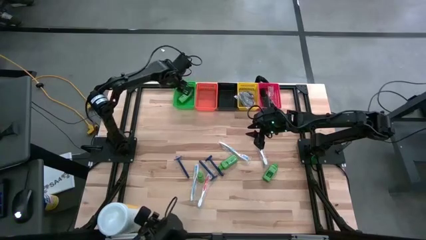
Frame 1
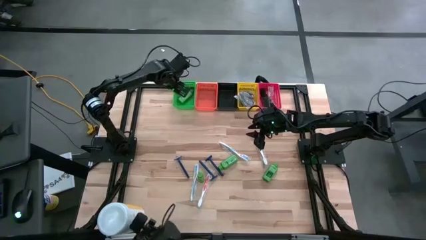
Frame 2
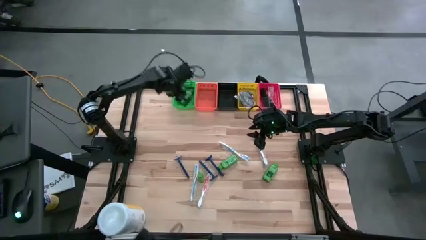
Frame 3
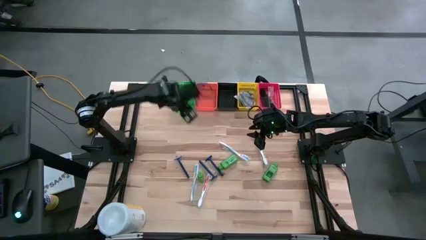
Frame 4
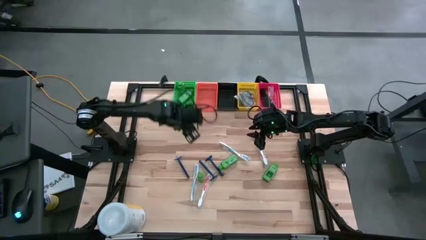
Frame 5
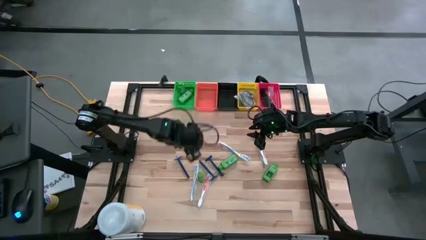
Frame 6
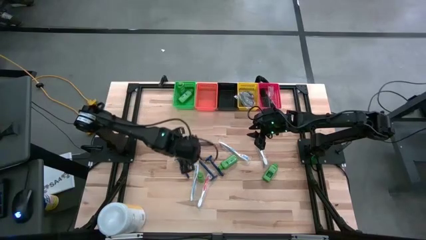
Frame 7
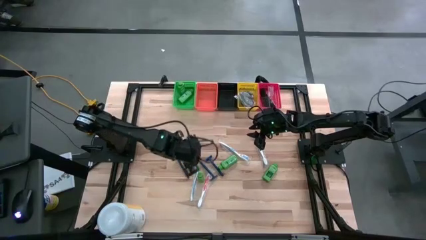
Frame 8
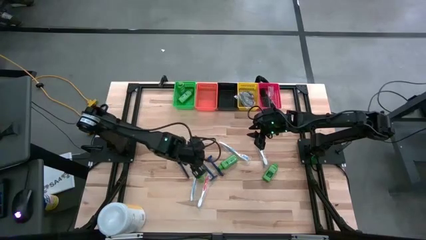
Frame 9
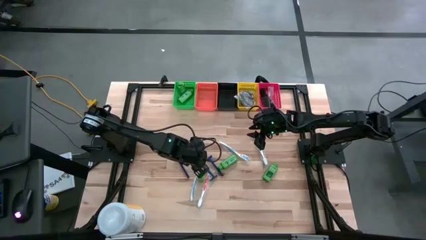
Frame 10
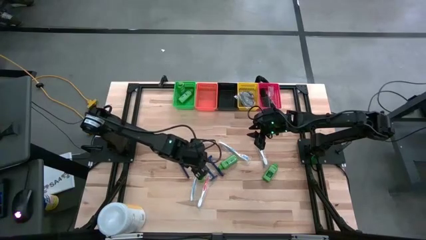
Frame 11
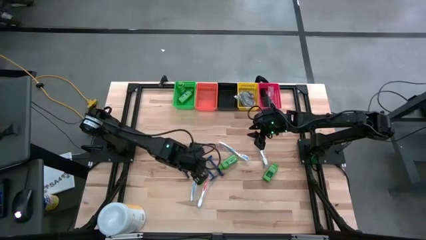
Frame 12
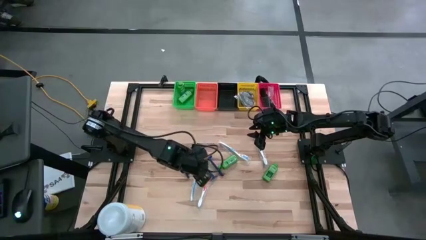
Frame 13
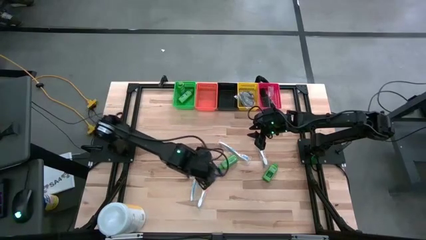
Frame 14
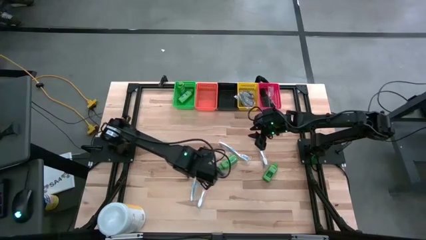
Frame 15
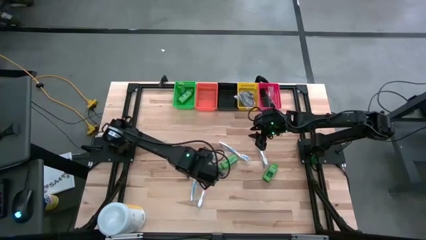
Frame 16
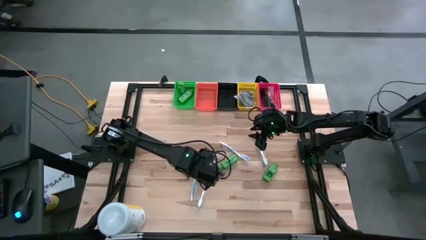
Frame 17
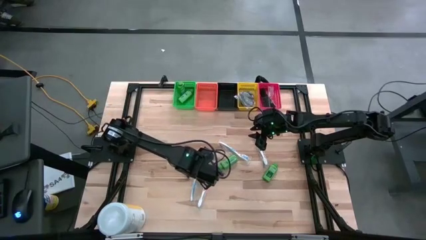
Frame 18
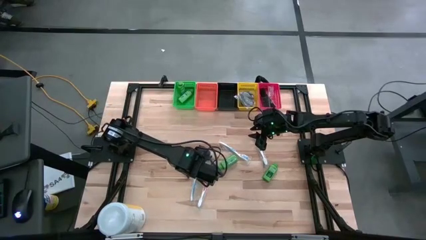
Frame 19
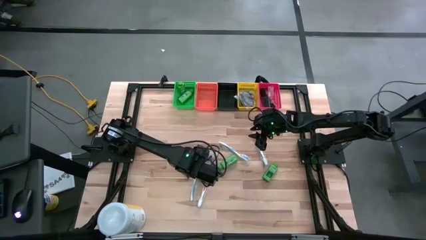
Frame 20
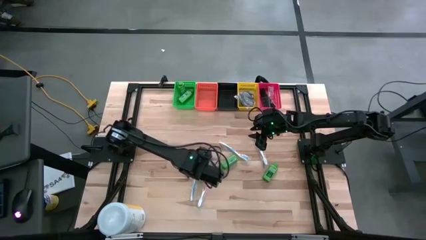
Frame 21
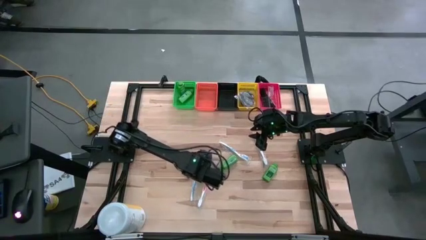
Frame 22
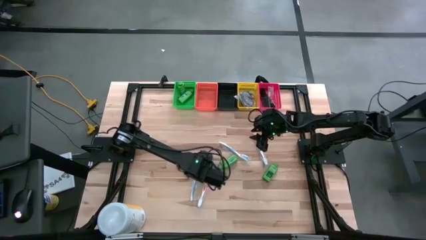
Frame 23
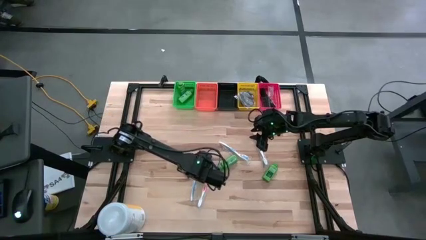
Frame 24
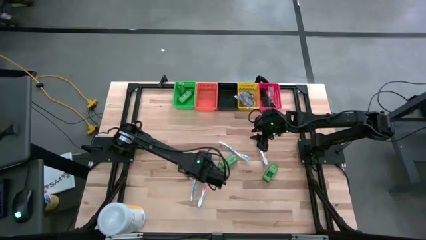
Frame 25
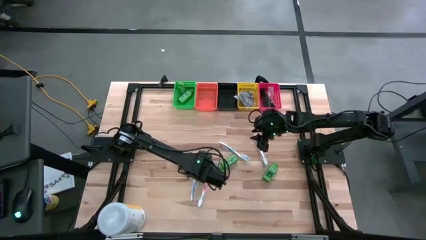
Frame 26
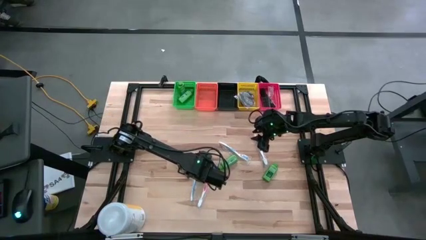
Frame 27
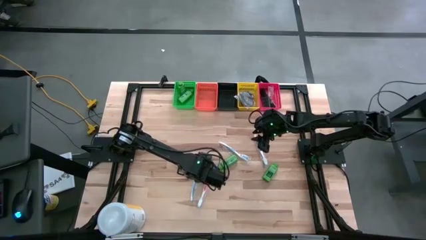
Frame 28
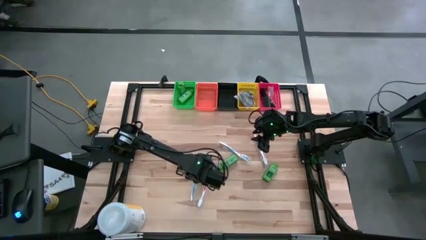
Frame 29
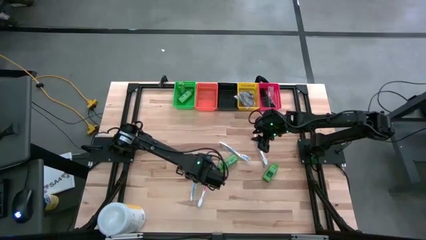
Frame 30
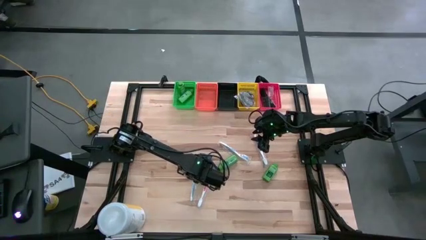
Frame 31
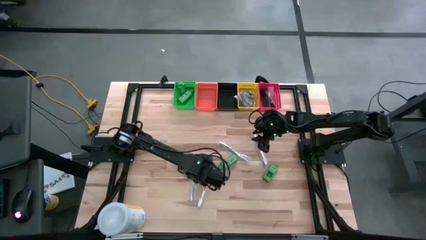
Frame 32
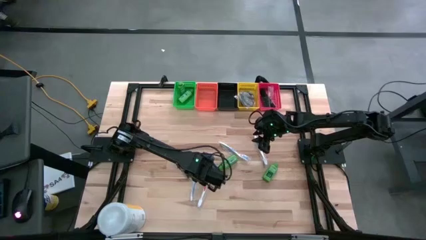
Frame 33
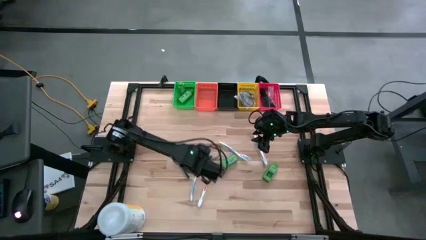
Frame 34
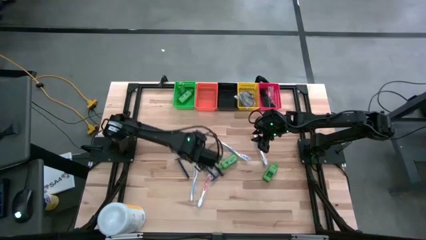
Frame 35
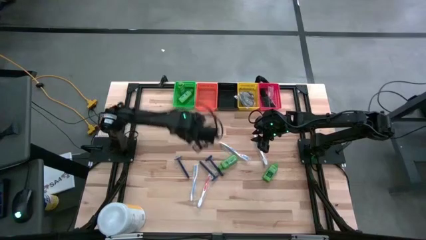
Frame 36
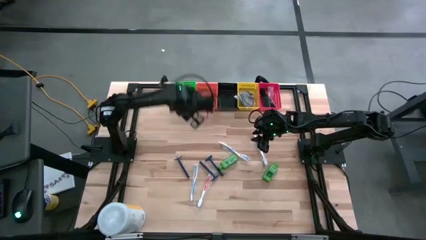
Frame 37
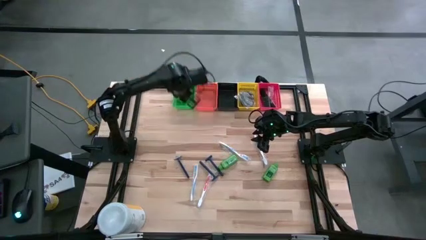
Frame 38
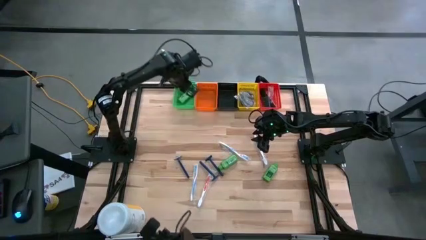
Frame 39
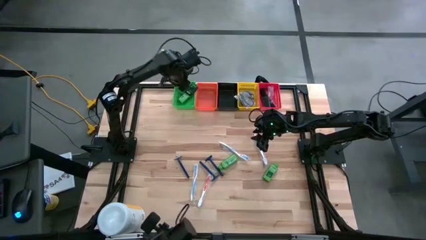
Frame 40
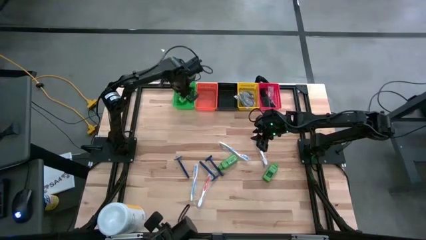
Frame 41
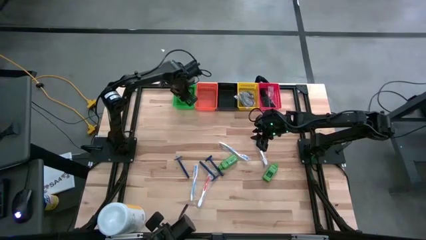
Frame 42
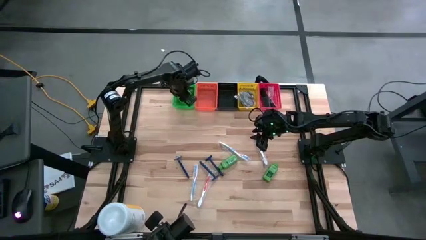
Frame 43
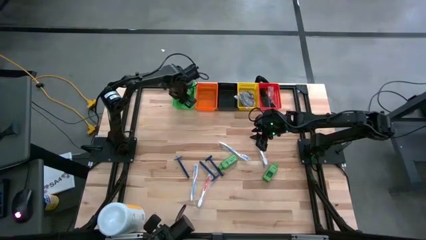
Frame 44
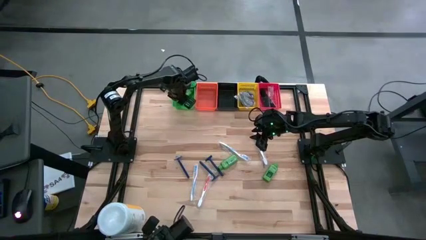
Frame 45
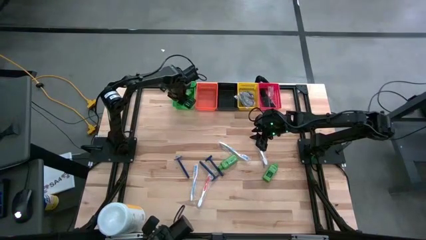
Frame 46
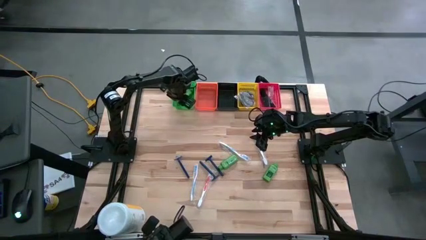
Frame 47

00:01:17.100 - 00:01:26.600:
Task: Pick & Place Travel size toiletries
Put the green shampoo bottle into the green bin

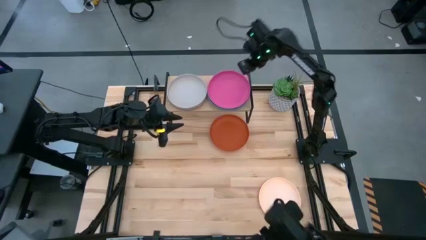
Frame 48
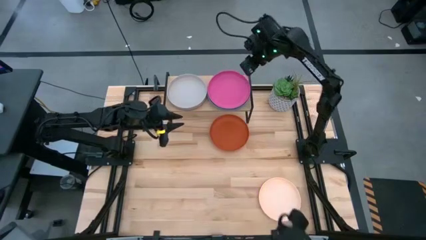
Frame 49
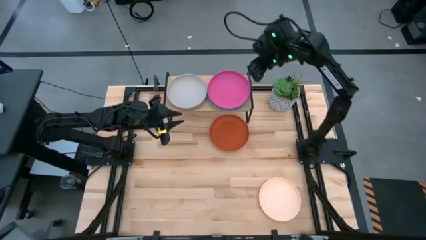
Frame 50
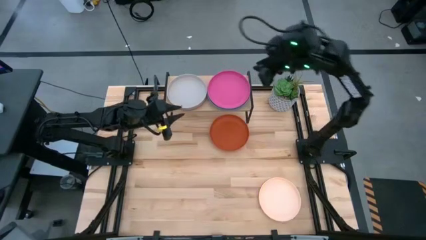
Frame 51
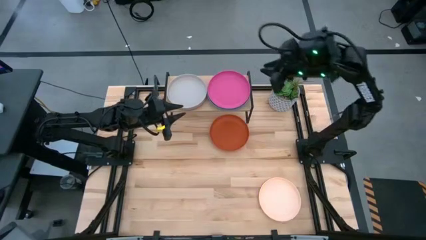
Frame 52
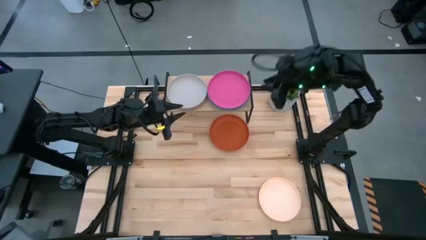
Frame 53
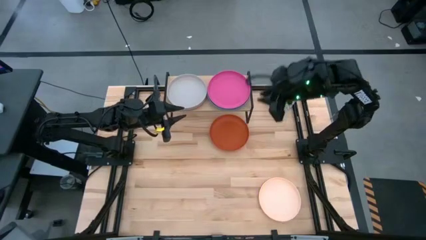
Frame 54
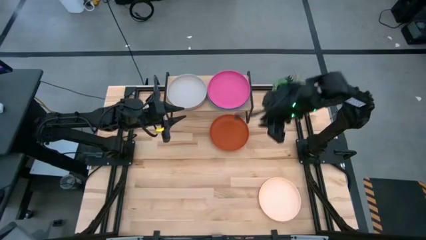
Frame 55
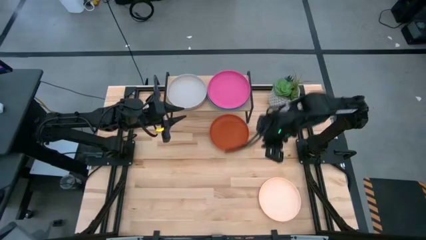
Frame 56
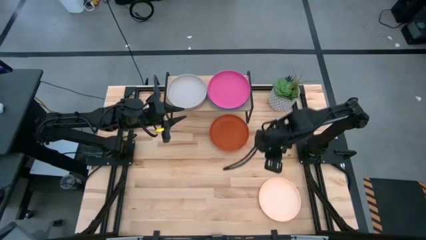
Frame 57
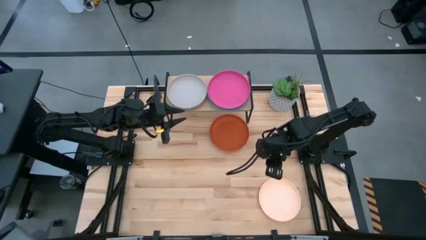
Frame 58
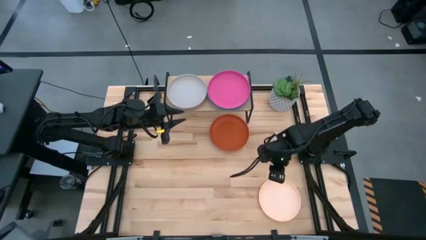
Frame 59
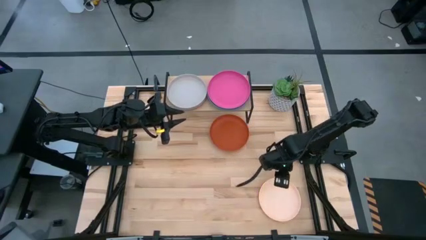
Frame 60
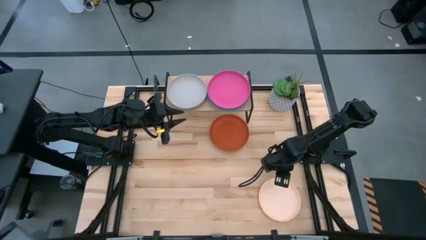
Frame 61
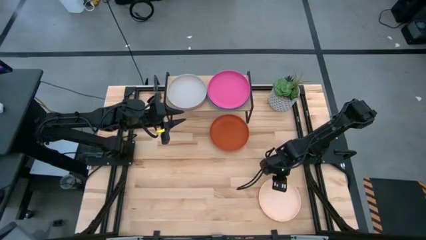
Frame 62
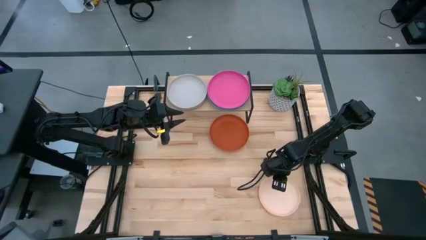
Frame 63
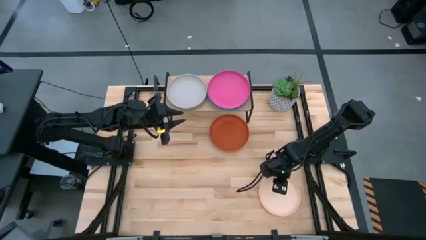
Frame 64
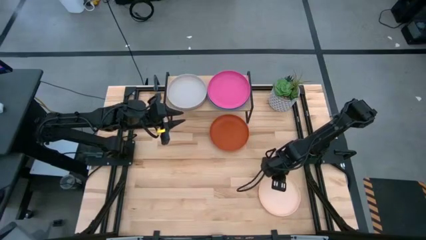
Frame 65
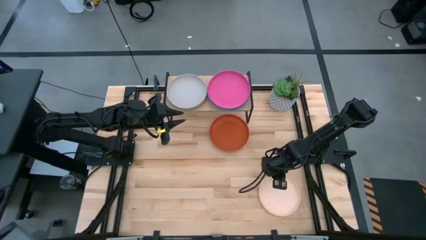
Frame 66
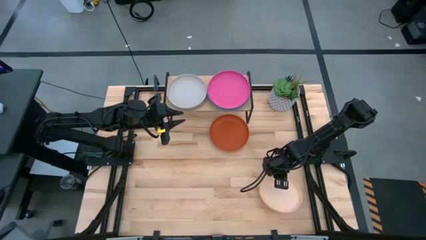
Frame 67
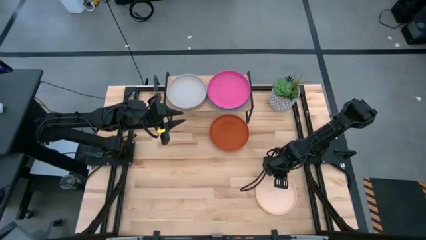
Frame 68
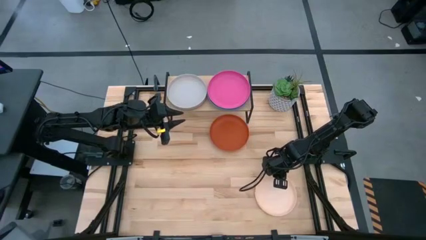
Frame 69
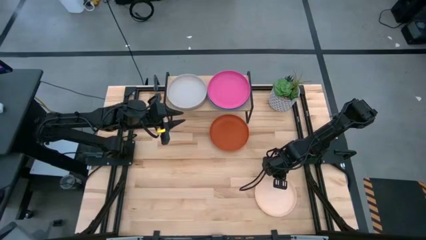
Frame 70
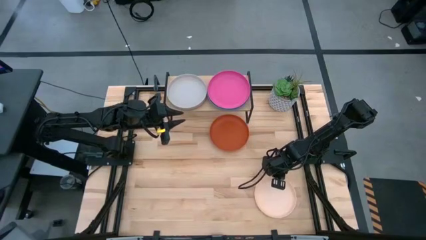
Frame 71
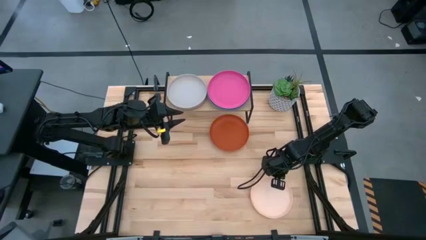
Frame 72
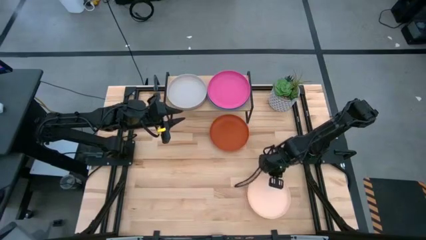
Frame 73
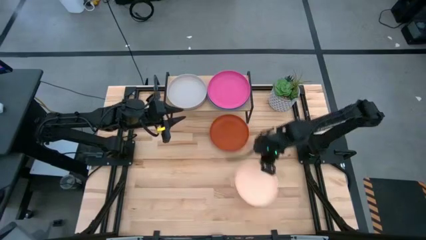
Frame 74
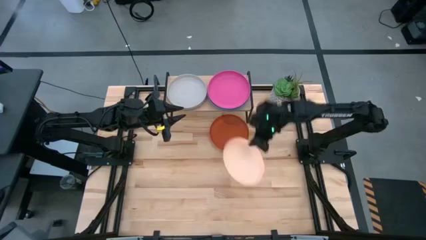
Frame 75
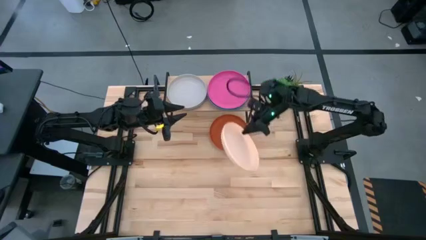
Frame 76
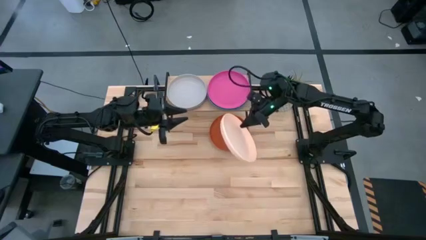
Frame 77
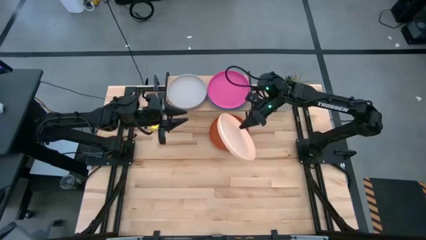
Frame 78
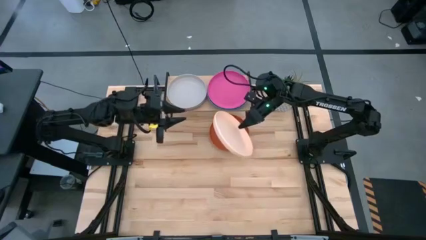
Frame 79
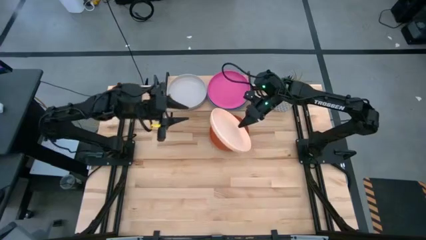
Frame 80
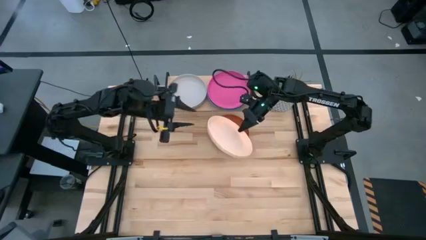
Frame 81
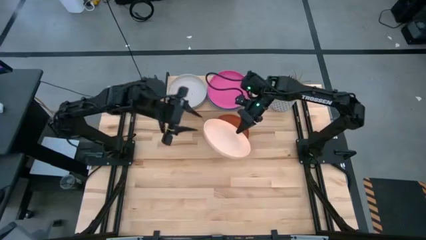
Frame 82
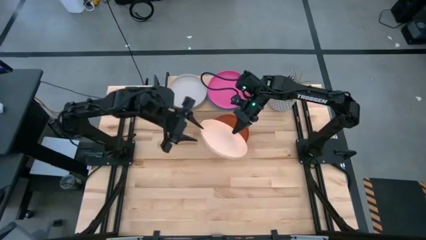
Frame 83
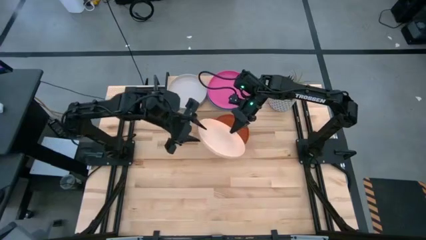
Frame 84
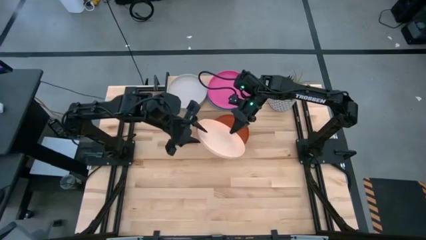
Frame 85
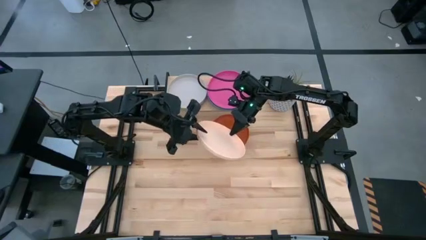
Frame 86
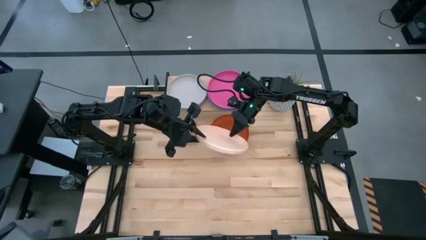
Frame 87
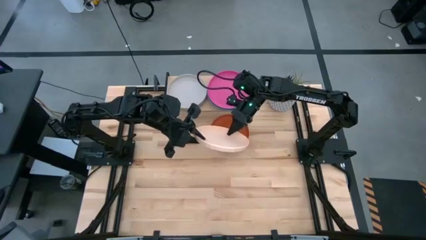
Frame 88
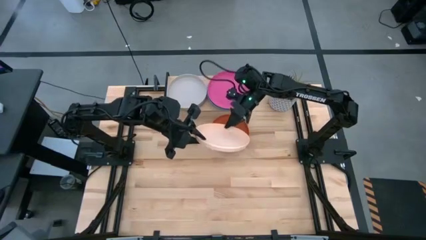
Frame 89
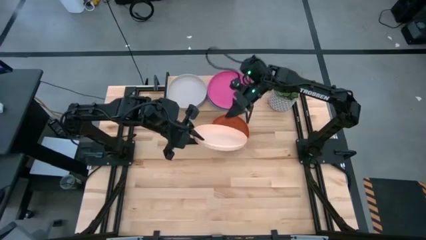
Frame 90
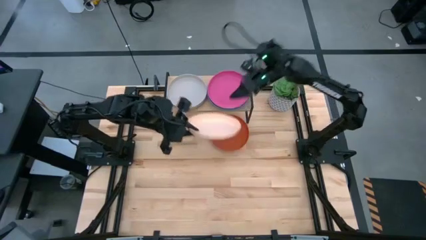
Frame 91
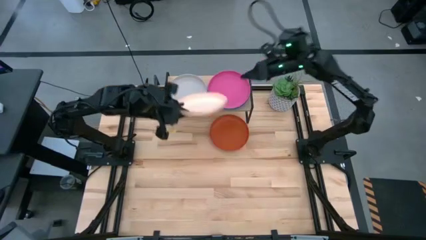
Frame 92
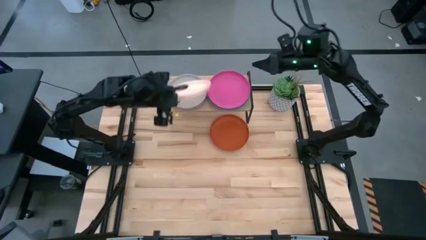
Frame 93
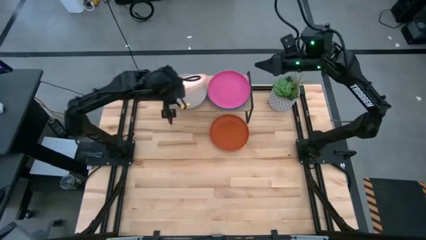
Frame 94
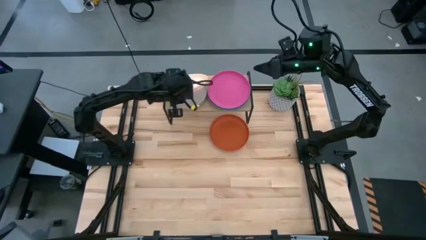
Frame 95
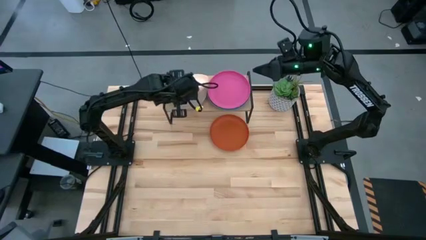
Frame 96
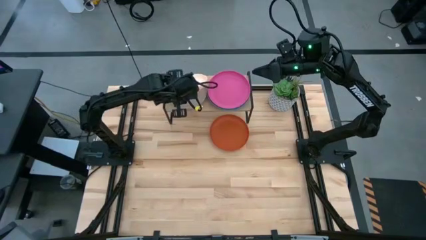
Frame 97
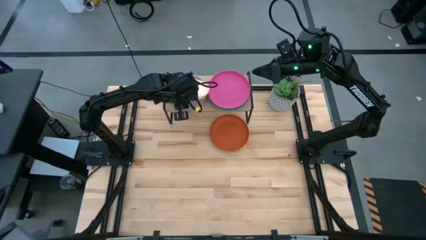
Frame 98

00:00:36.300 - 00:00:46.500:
Task: Place and stack plates onto a shelf
Stack the light orange plate on top of the gray plate on the shelf
